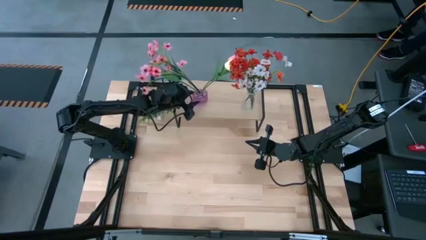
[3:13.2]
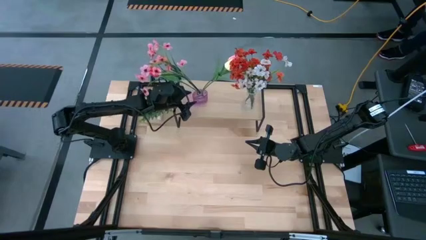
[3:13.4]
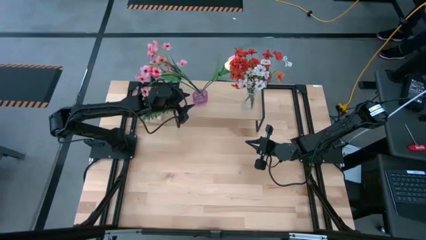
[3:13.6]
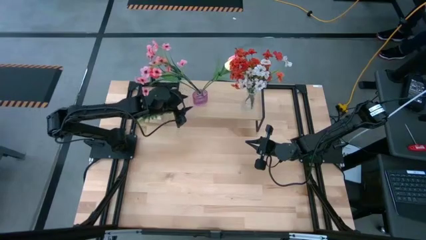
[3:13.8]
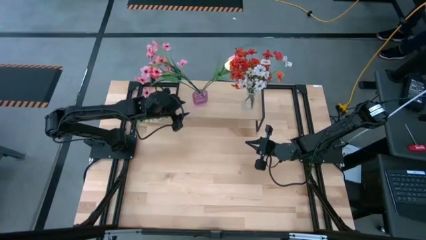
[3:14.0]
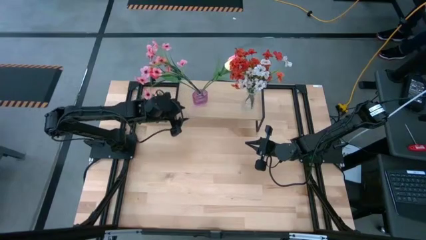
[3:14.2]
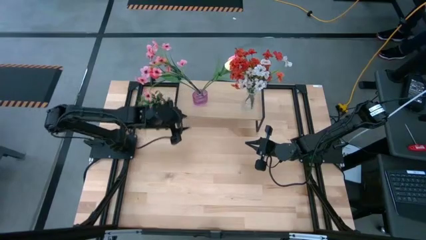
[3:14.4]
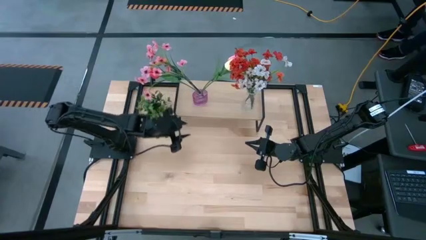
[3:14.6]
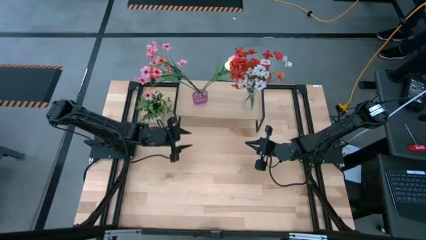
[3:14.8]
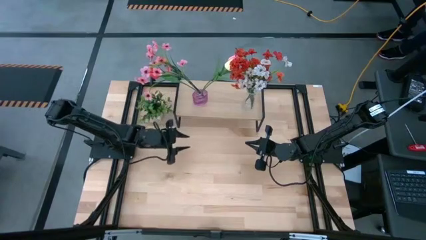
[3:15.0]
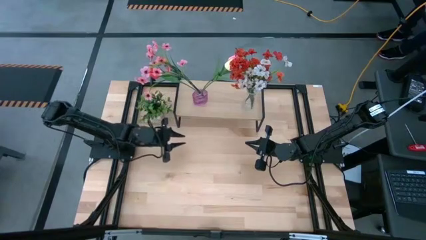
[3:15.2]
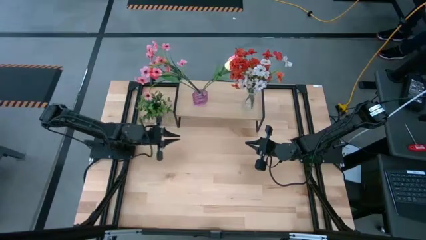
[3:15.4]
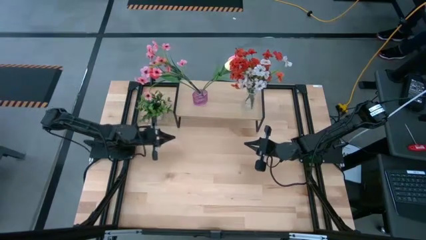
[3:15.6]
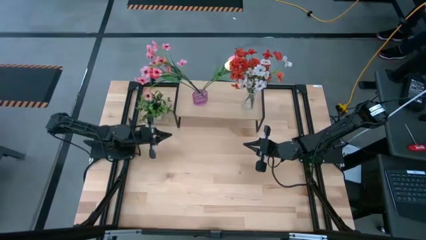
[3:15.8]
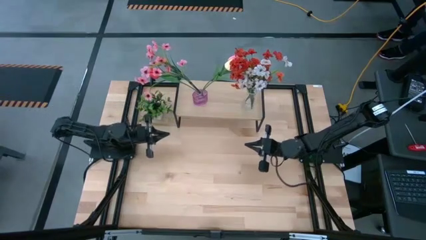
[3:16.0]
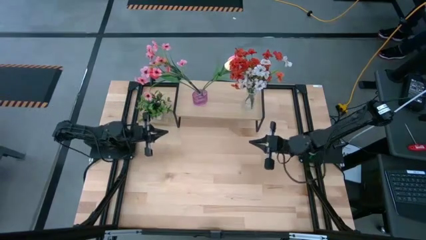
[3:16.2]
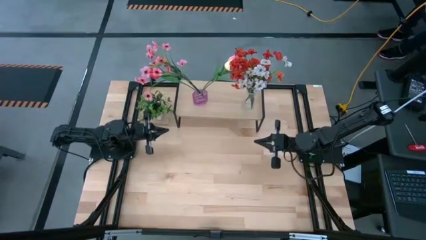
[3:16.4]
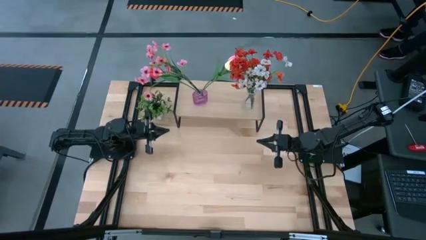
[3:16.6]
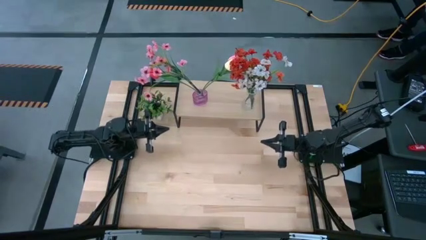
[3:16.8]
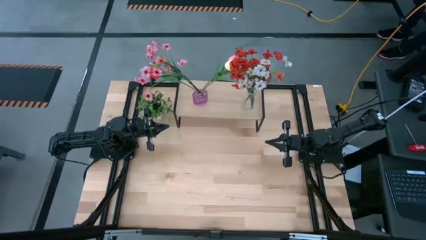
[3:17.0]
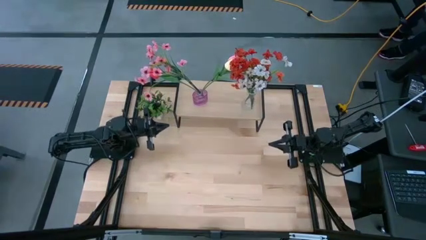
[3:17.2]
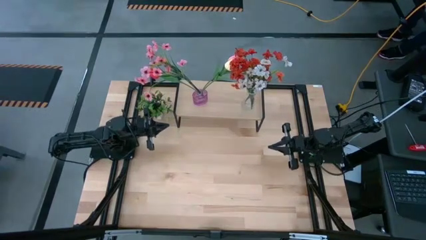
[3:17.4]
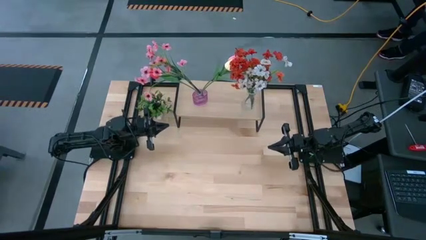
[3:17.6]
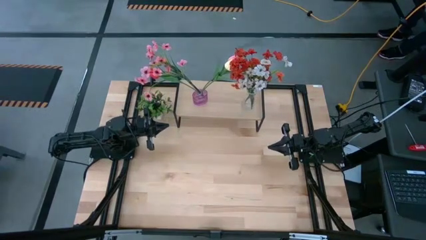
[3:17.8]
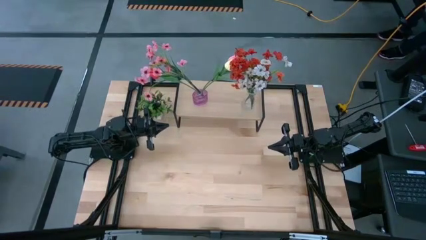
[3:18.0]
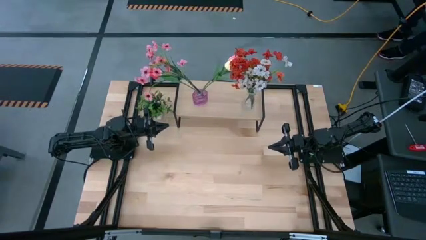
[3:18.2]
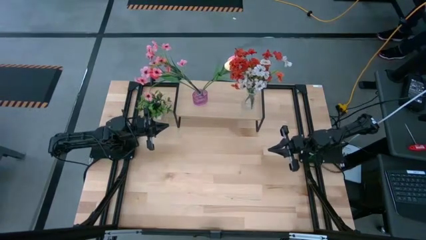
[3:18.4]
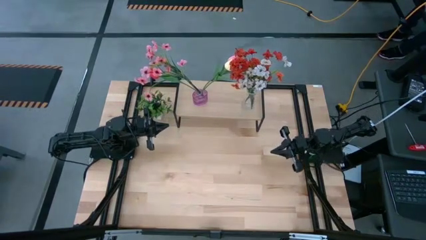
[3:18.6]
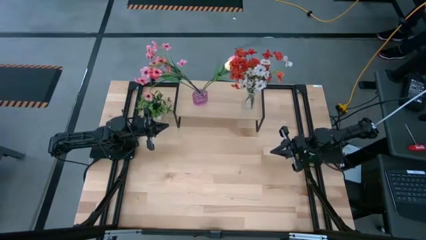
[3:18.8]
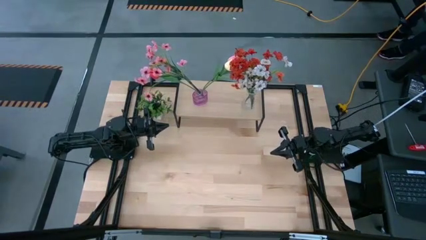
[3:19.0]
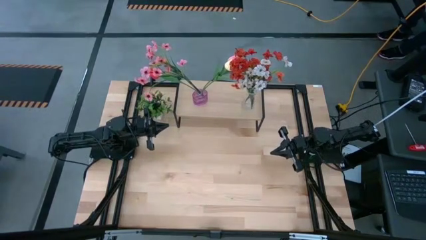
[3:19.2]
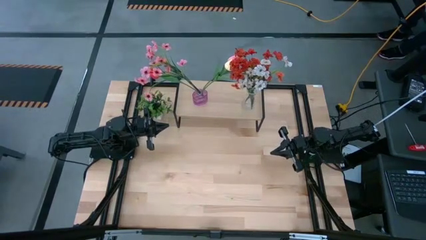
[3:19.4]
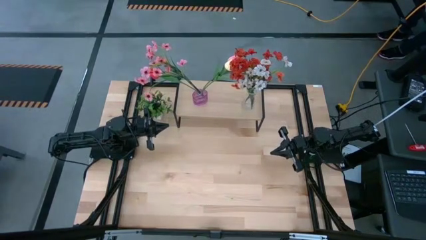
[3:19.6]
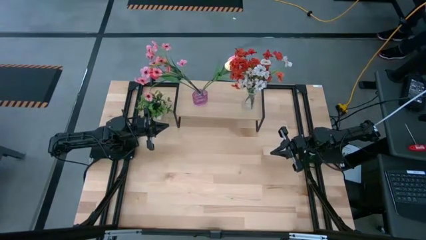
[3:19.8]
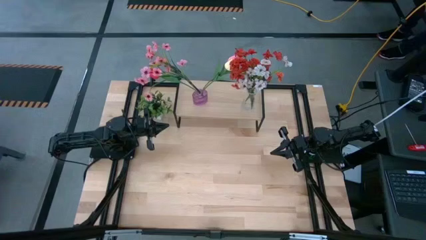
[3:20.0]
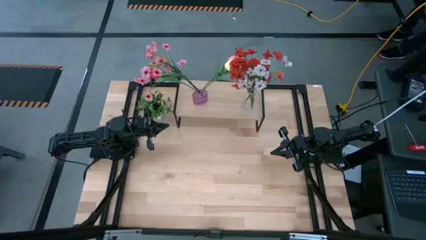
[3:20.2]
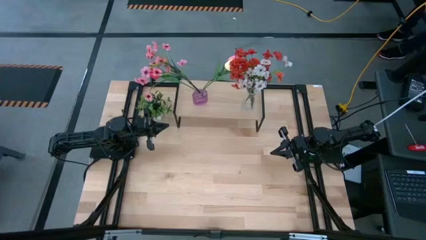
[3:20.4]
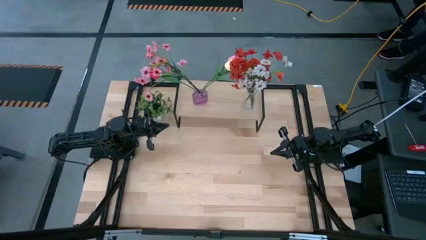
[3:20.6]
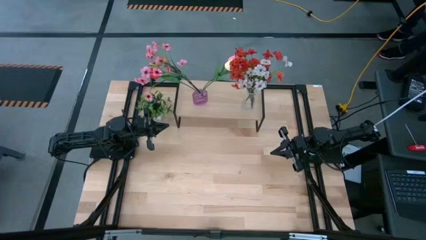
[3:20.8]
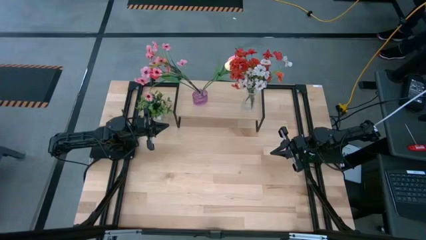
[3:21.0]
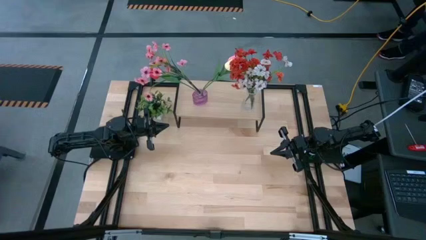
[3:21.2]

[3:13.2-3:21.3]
Task: Pick and place flowers into a vace then onto a shelf
Return to Home Position

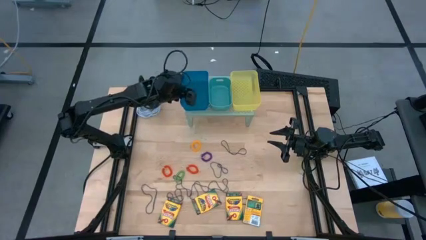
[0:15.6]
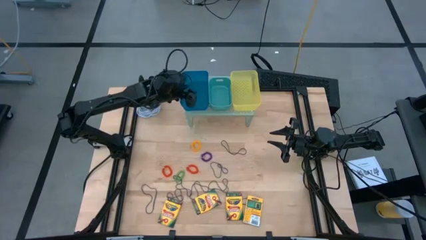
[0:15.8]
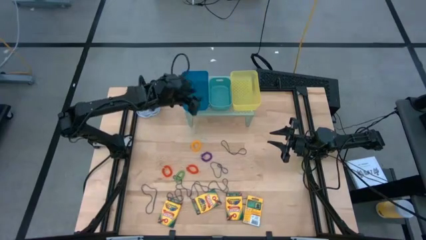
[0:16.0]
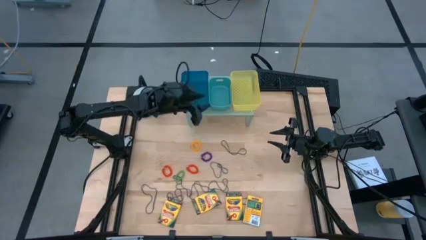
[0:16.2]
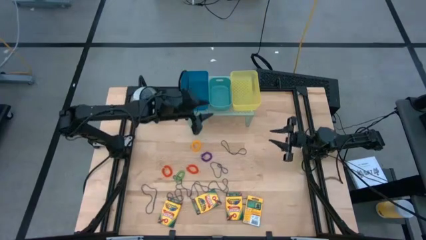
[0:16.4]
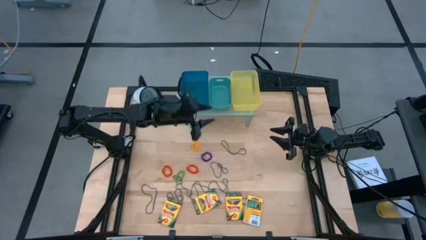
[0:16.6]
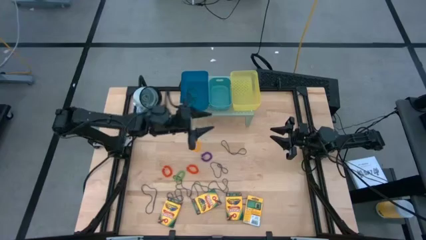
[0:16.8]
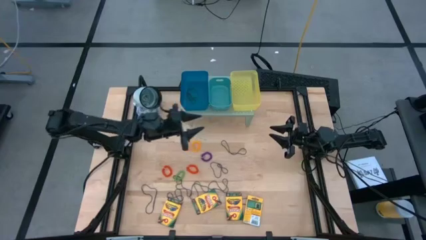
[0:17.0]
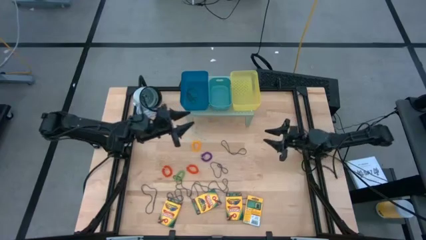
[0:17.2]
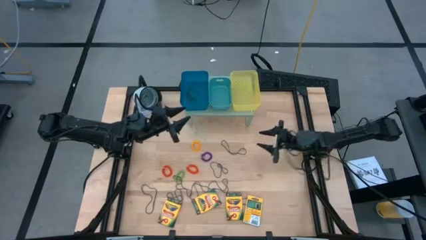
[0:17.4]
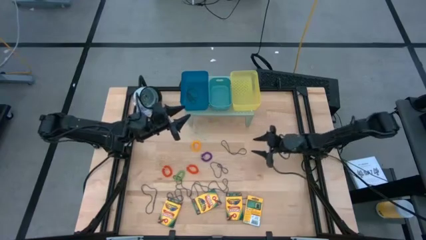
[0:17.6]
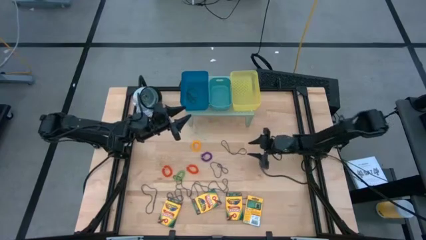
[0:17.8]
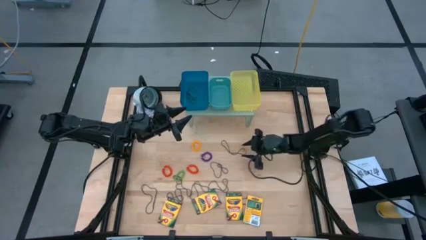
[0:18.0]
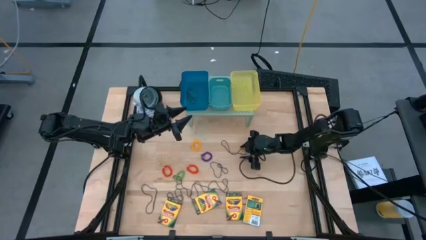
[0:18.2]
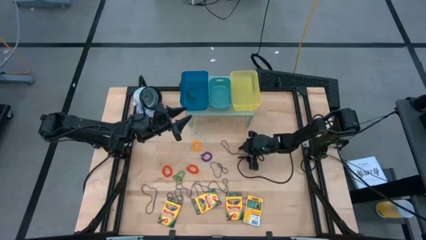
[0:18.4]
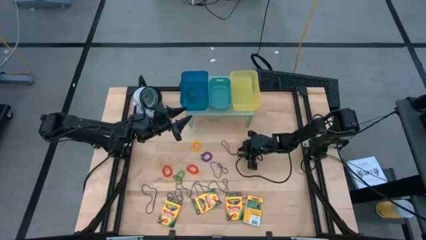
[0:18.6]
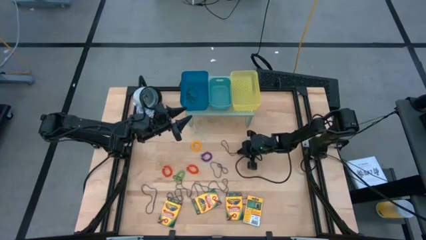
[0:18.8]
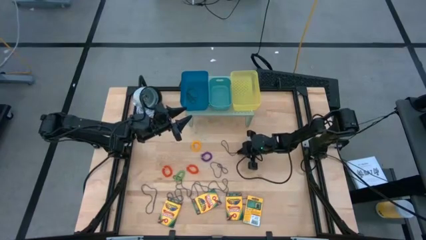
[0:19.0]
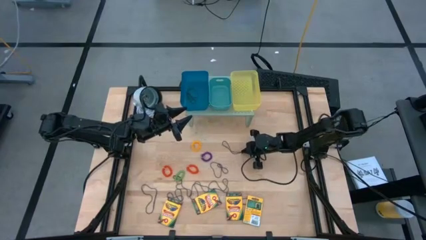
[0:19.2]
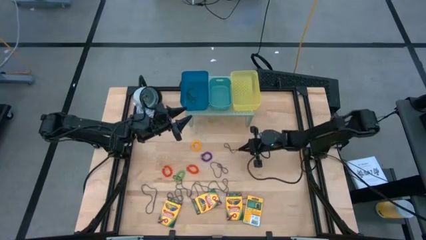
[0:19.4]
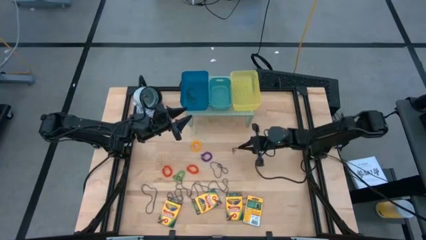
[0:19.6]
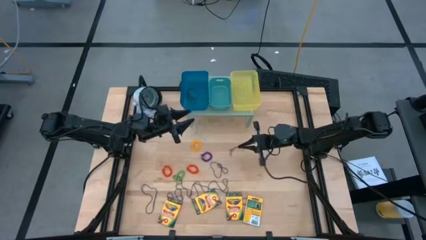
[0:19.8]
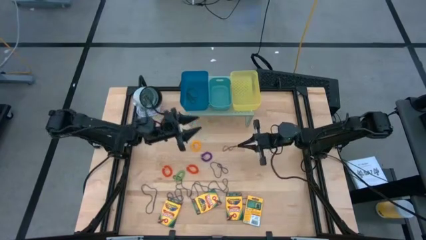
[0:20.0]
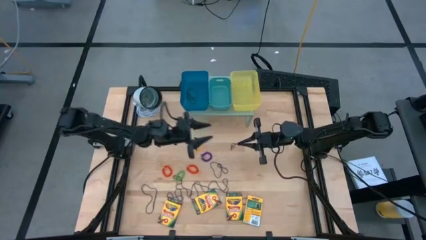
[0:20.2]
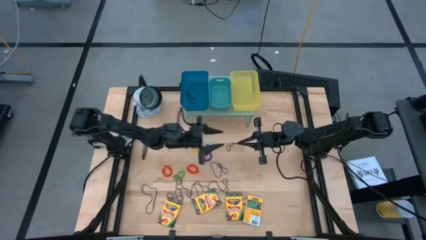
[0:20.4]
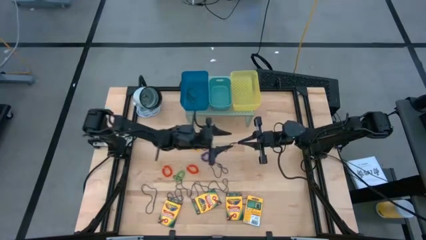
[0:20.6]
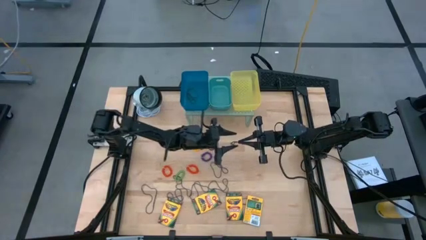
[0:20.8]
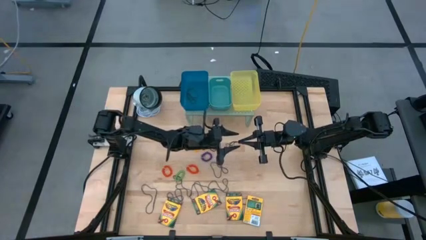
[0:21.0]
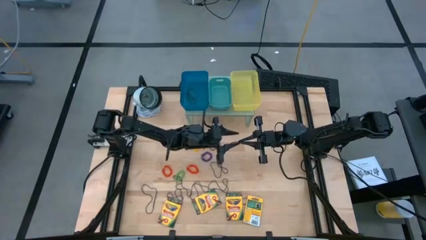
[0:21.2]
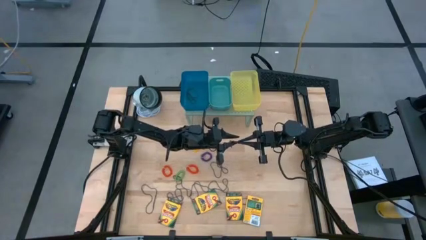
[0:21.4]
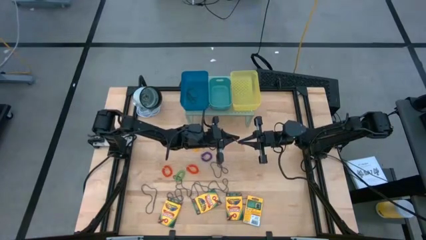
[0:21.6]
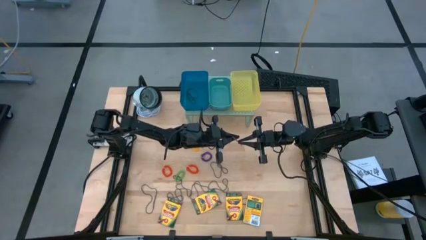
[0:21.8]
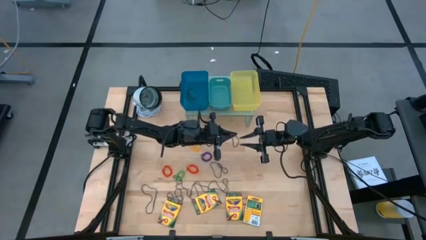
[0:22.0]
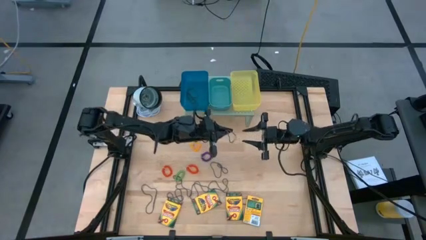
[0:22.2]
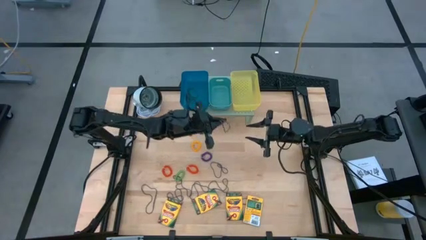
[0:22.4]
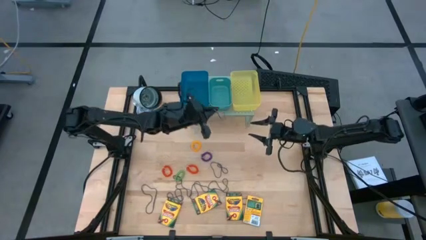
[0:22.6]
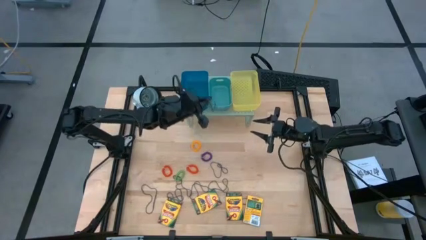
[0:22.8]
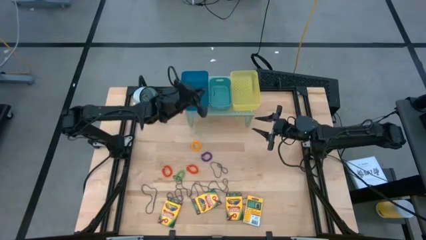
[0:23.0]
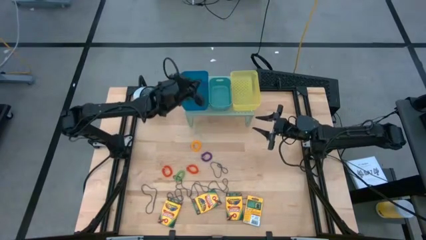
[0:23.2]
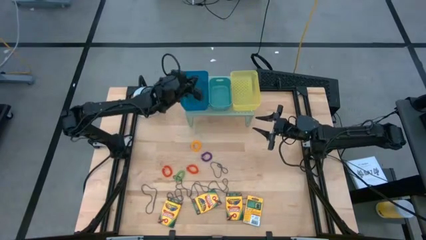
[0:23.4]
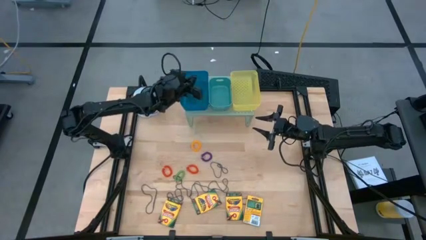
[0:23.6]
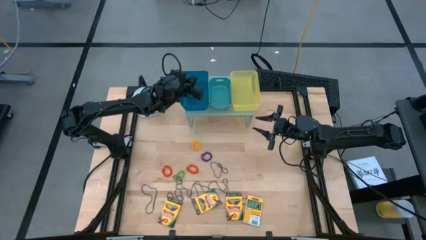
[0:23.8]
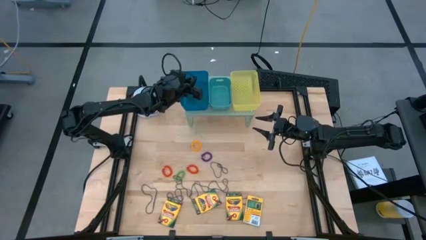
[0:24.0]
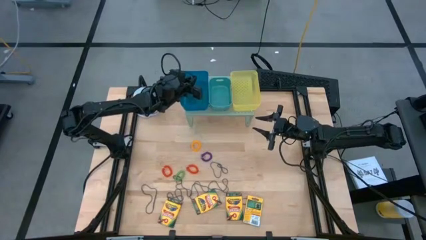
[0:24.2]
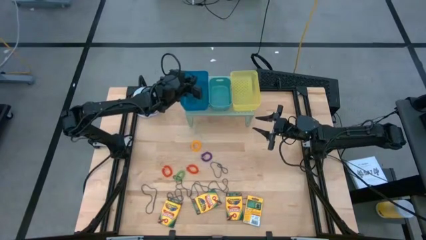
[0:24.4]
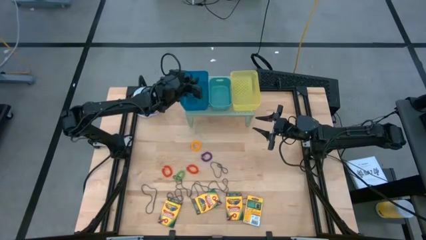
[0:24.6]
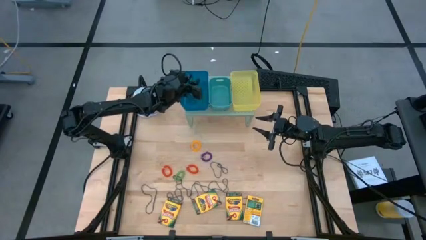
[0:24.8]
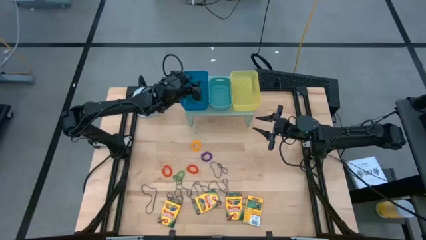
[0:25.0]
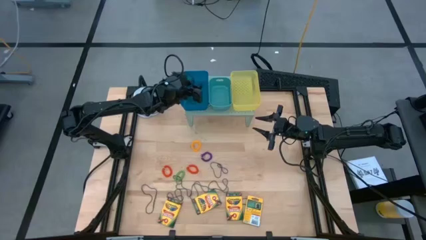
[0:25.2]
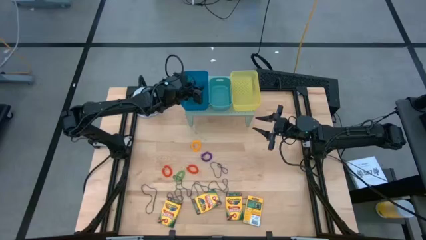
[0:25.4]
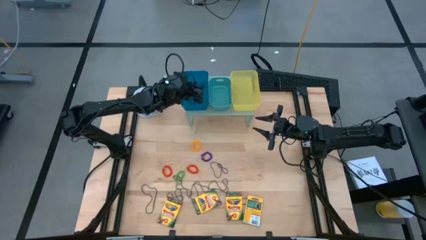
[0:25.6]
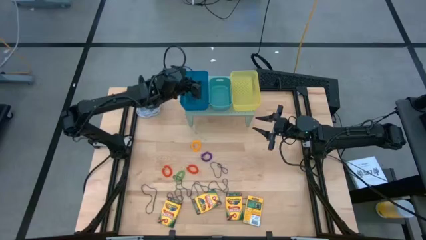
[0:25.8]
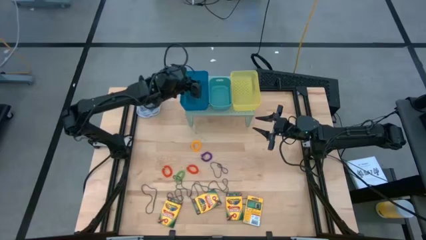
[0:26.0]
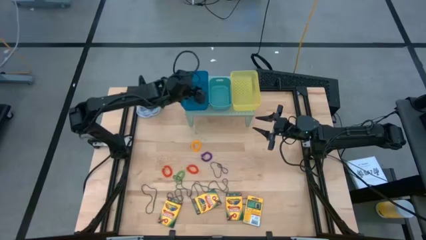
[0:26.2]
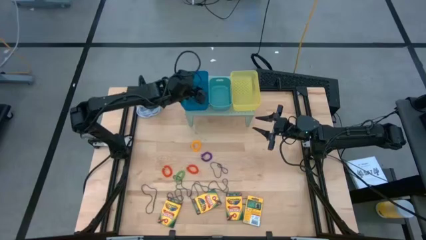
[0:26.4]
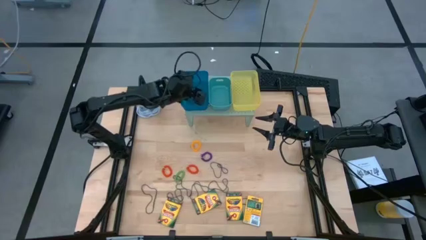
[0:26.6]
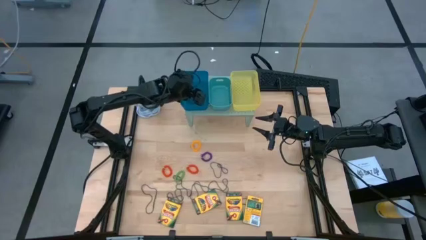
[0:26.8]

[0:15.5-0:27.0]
Task: Pick & Place Office Desk Supplies
Put the purple rubber band into the blue bin on the shelf
